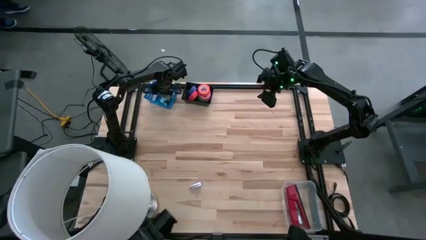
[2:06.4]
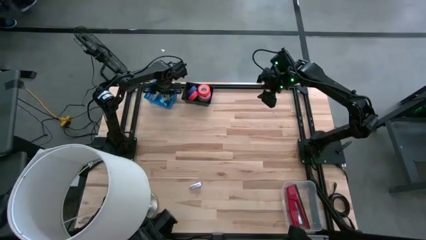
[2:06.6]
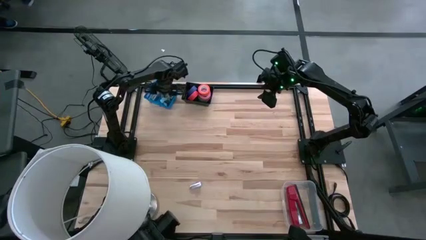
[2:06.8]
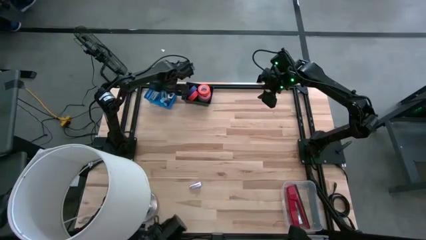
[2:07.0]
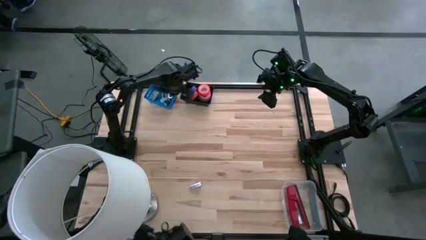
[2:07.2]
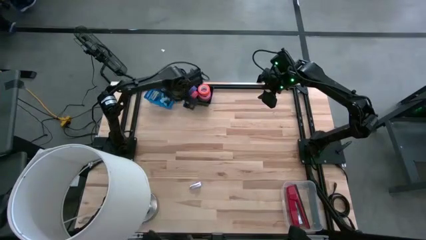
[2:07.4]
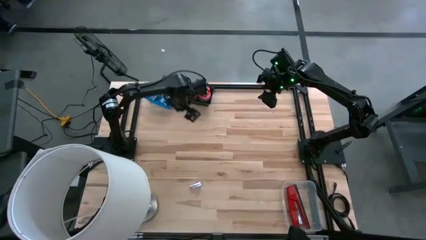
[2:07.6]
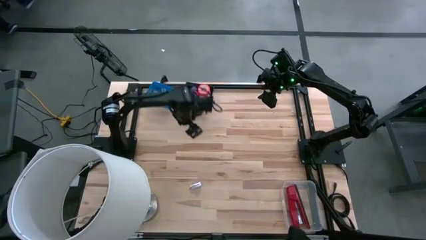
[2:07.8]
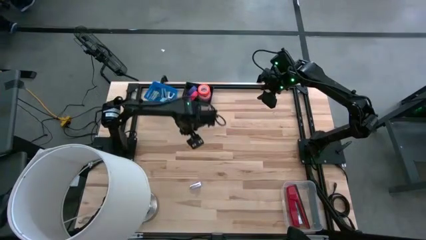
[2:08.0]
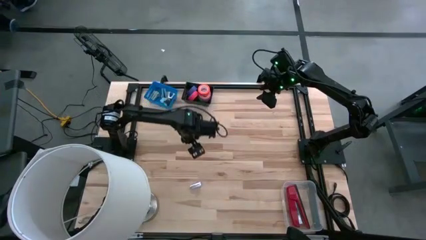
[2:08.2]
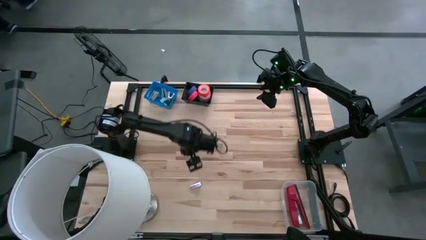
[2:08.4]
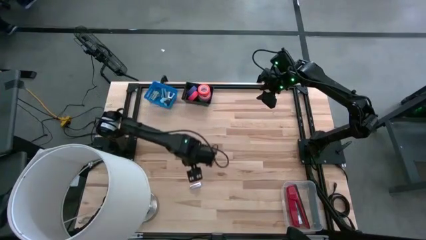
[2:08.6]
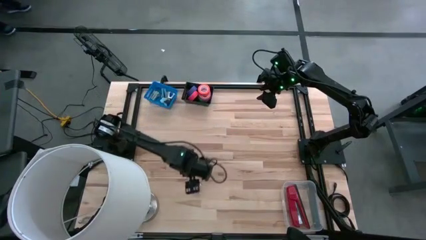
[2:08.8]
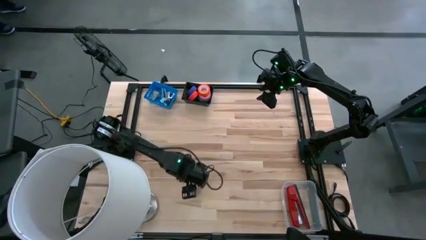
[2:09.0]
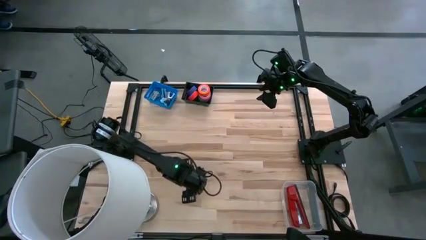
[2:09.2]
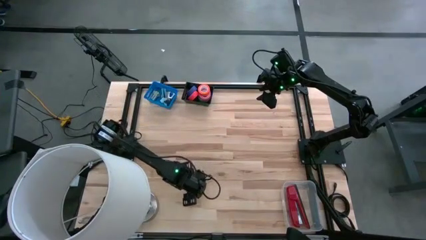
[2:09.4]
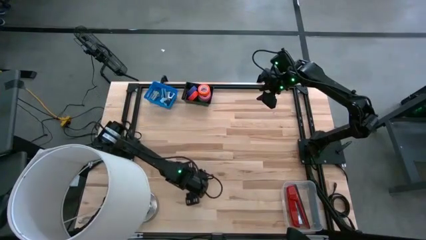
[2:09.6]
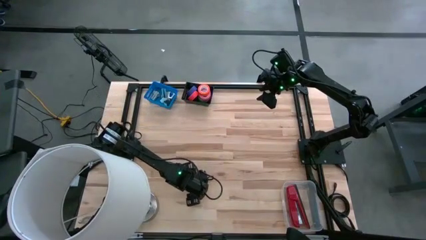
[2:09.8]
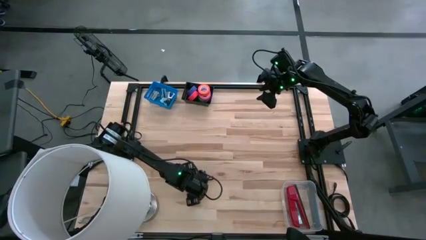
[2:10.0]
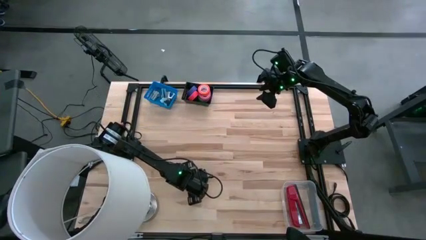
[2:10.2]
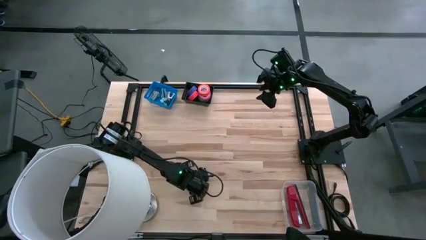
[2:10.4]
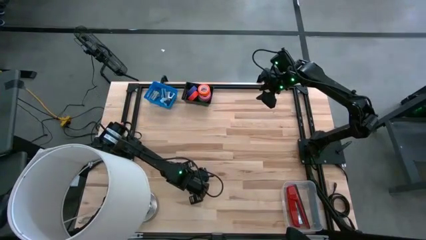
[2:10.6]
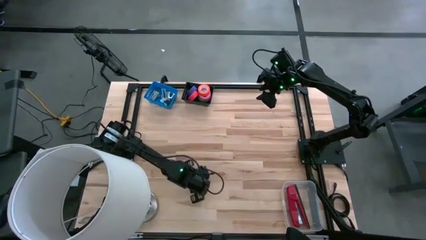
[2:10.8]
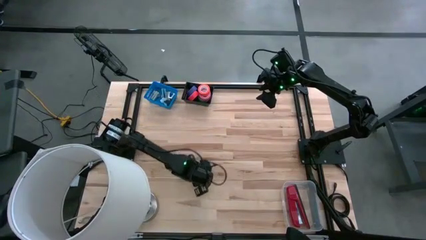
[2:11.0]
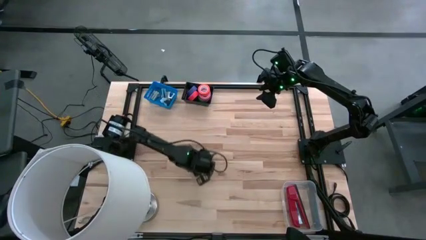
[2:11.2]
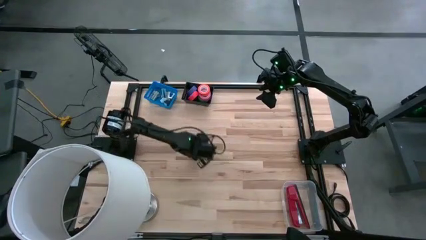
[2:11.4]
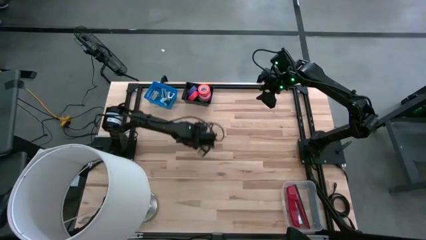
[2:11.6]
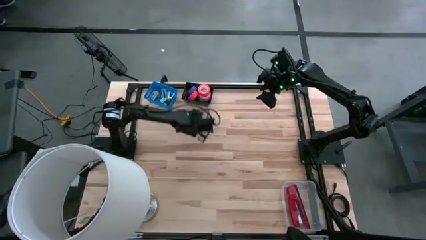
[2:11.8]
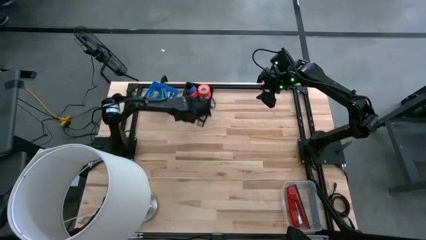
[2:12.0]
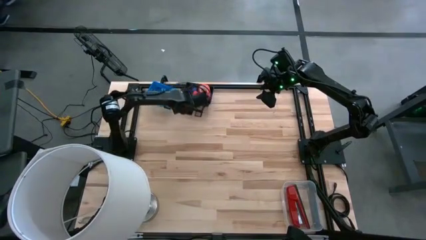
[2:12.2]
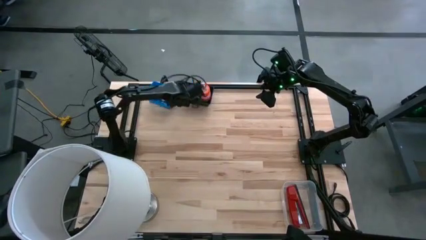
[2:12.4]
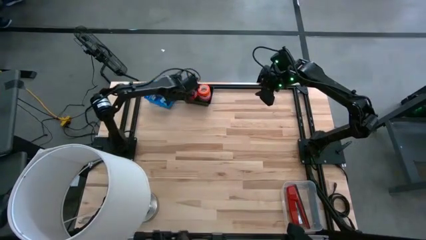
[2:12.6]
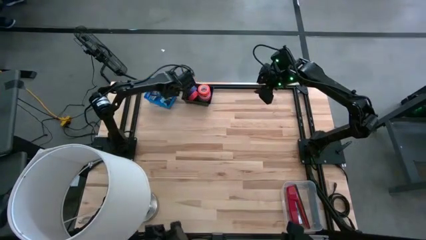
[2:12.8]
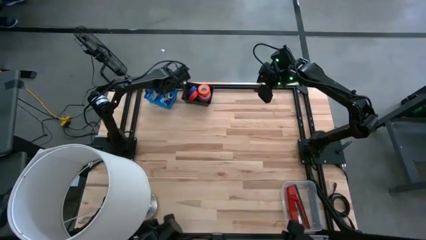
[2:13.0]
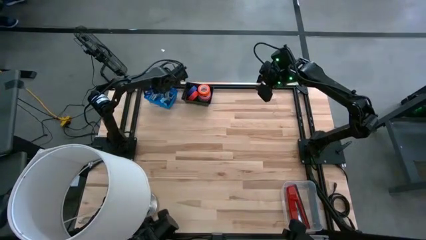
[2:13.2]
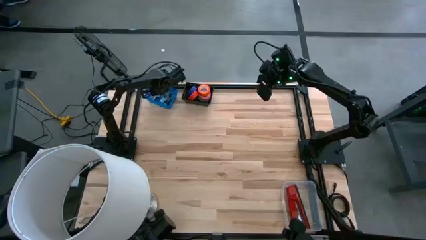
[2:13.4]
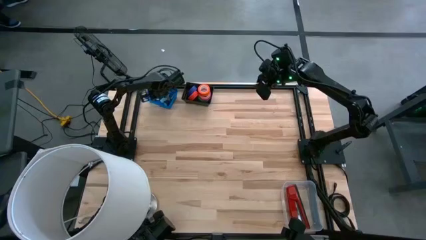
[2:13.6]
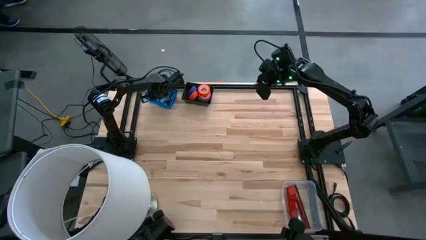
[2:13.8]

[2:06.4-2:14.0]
Task: Pick and place Stapler, Stapler remover, tape
Put the purple staple remover into the blue bin

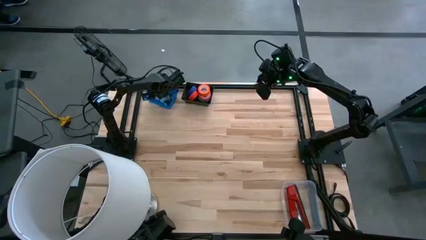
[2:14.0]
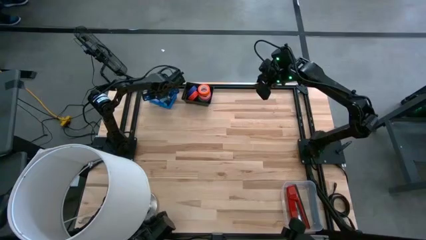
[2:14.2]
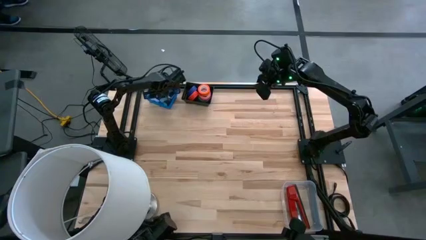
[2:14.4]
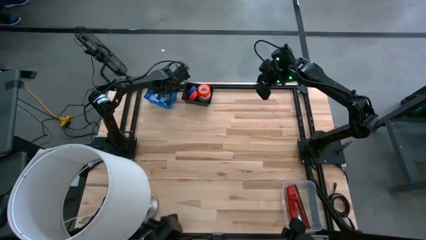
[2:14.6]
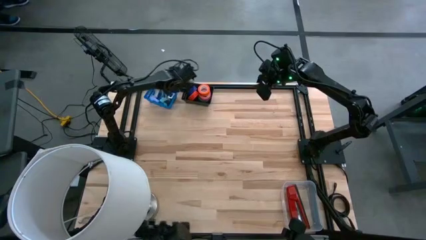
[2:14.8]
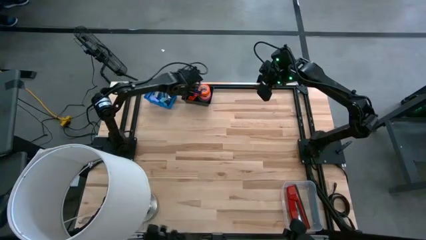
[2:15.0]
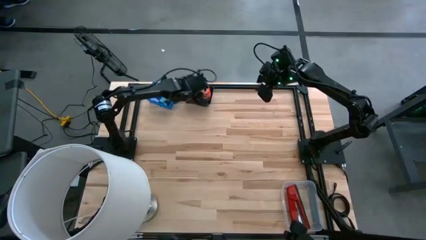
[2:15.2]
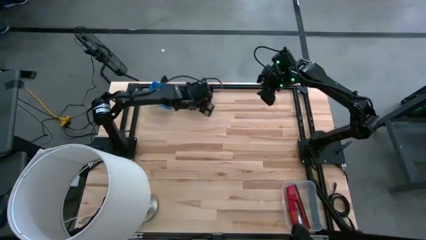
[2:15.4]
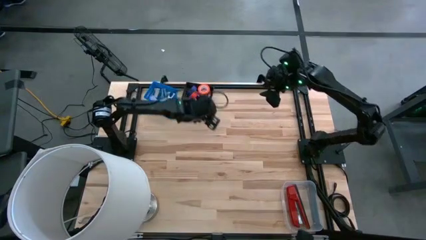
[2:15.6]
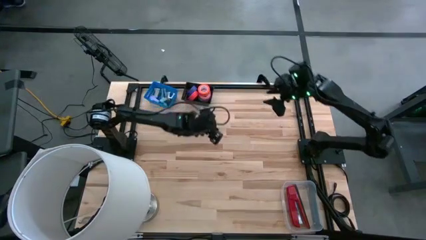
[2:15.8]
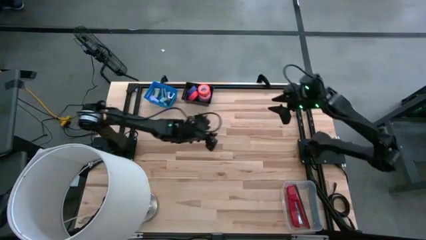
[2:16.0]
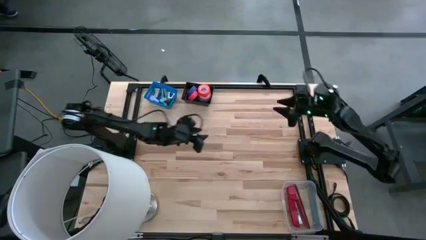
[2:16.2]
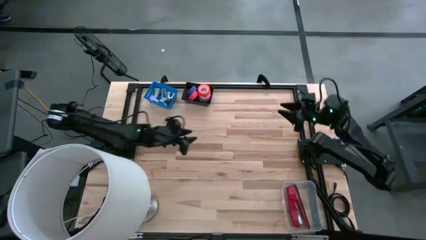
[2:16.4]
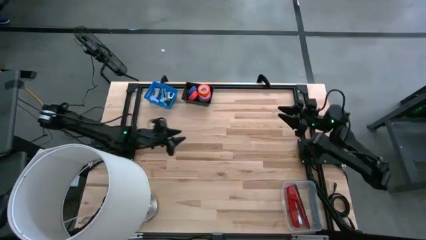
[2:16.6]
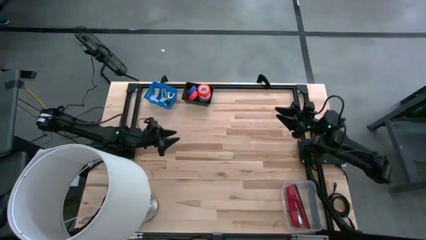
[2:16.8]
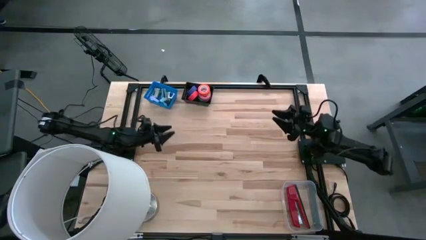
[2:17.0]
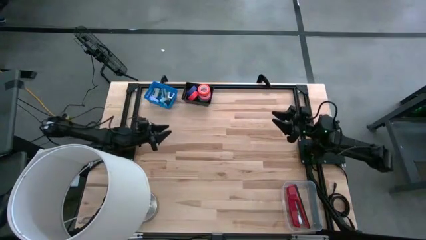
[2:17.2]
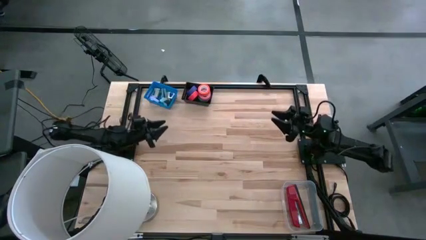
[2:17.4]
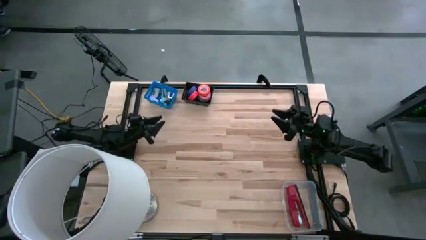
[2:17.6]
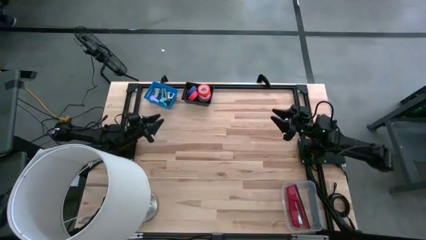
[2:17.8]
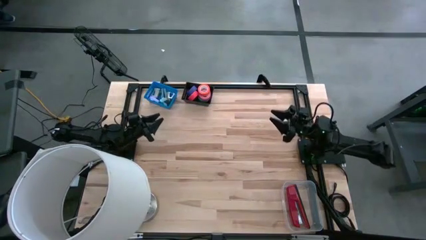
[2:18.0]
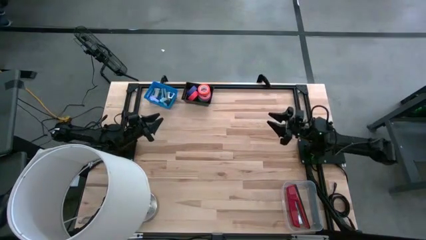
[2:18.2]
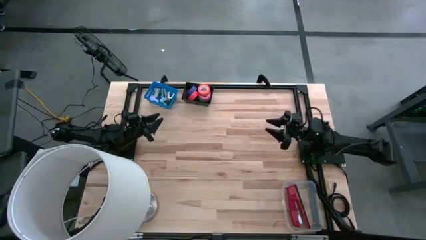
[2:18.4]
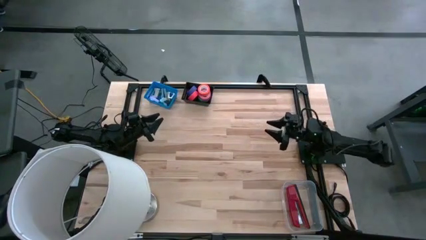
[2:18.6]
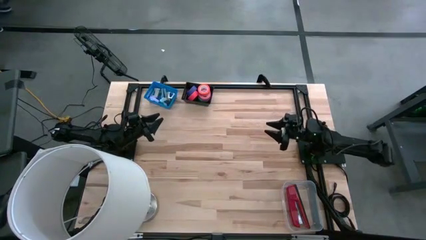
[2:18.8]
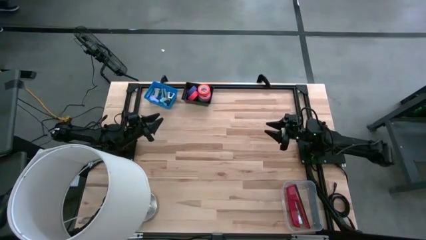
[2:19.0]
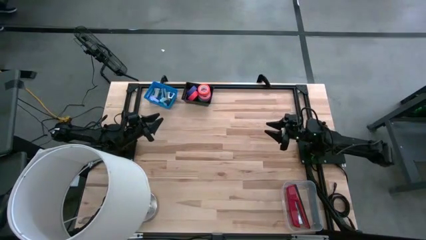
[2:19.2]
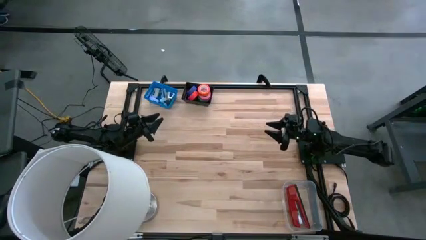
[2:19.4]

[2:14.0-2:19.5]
Return to Home Position

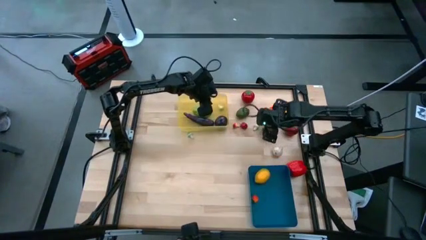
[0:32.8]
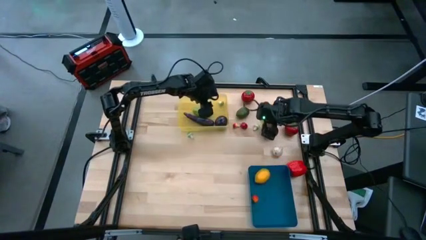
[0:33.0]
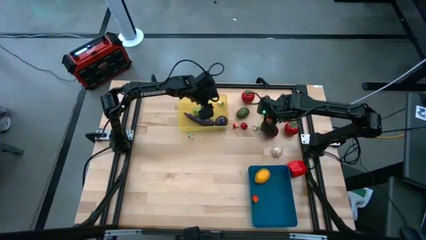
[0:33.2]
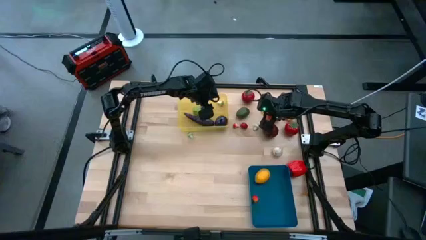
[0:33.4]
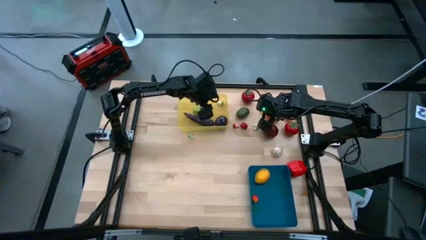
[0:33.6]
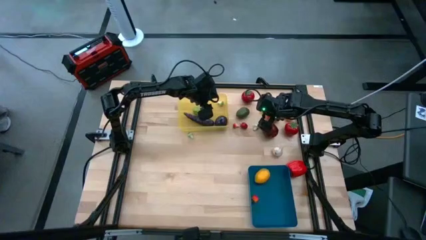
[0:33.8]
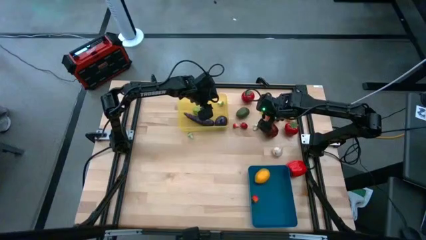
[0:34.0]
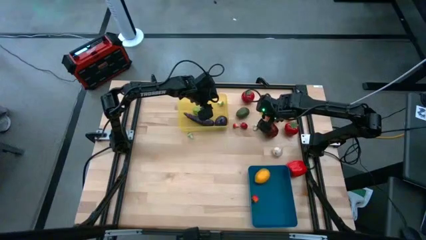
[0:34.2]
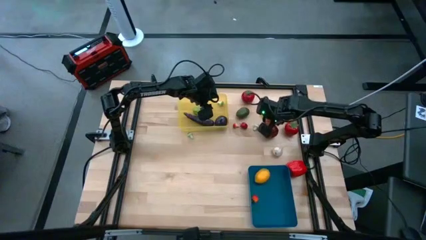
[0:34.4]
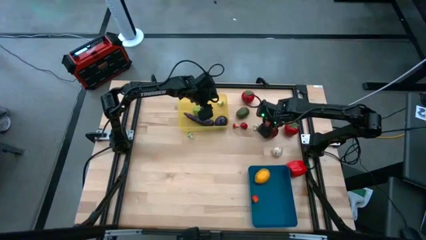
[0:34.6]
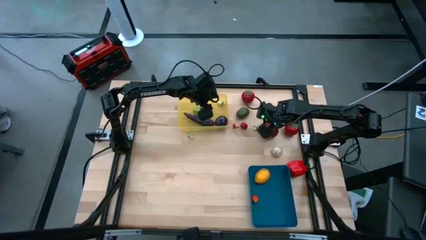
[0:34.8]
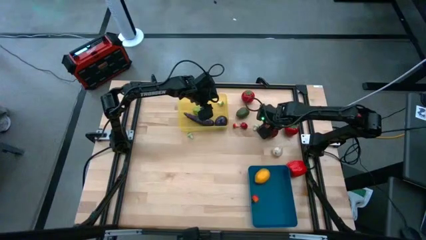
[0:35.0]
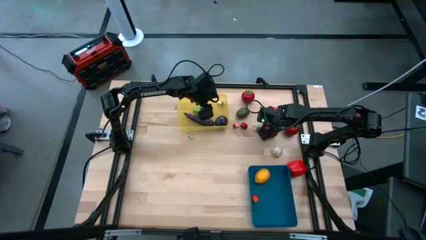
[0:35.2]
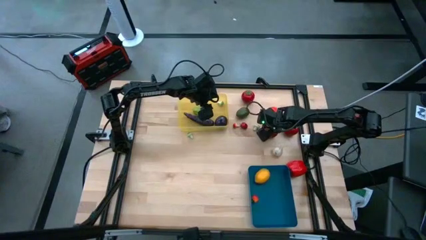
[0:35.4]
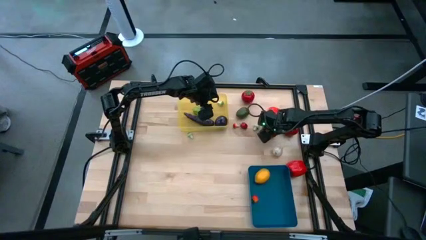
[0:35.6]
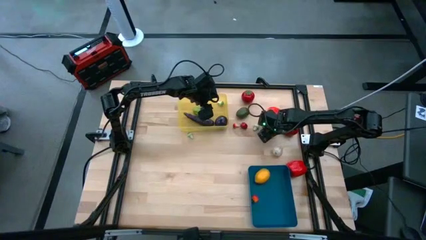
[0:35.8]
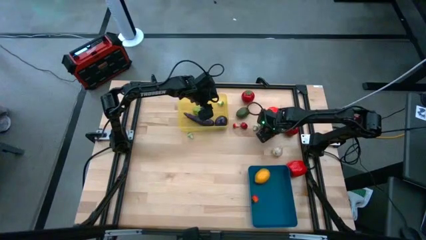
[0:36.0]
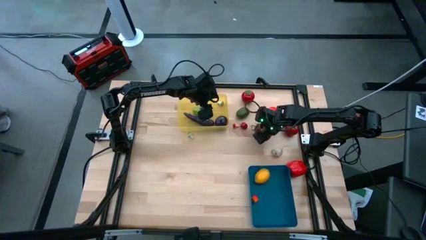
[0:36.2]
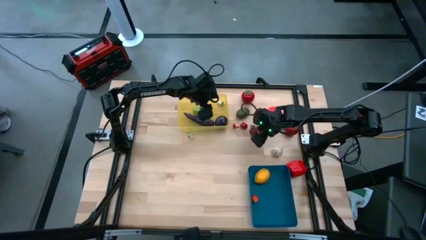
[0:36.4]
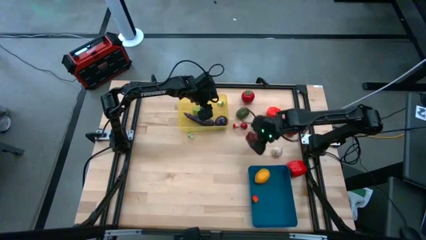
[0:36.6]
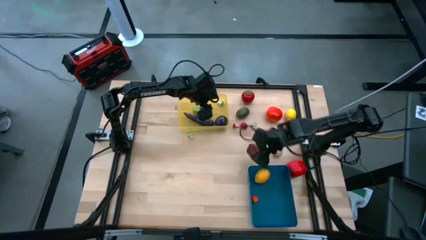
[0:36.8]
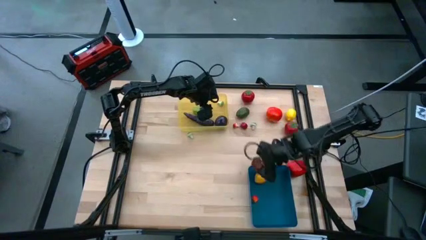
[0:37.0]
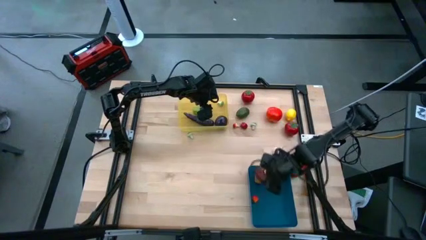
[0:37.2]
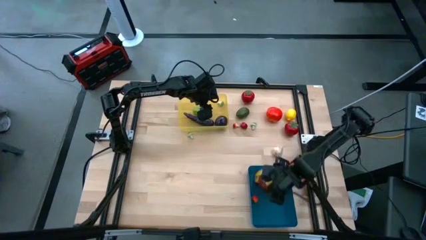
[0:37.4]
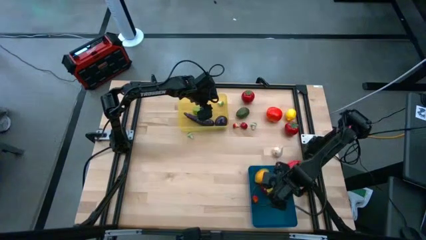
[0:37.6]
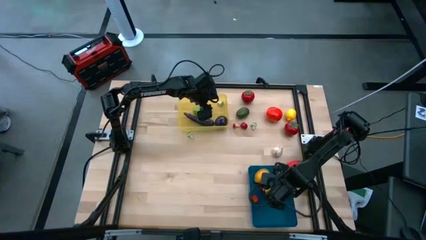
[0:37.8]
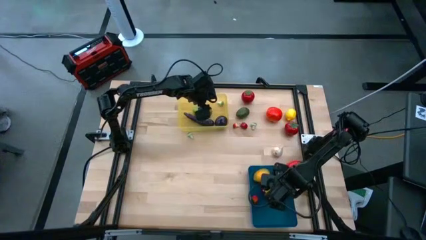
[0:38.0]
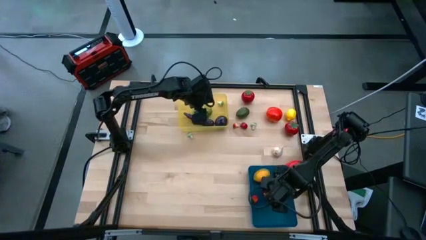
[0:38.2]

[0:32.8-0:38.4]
Task: Sort produce into baskets
Put the red apple into the blue bin
